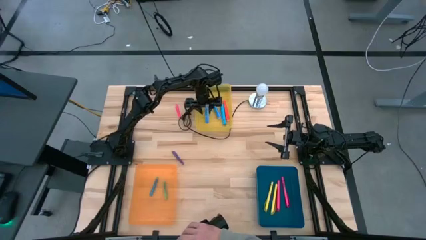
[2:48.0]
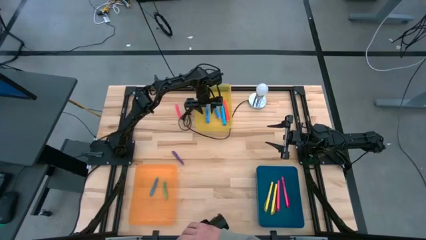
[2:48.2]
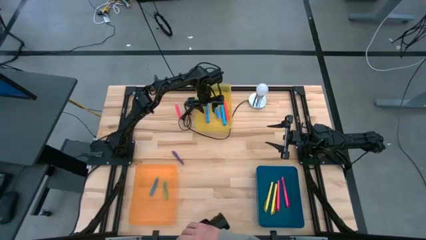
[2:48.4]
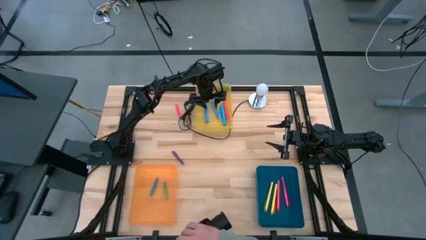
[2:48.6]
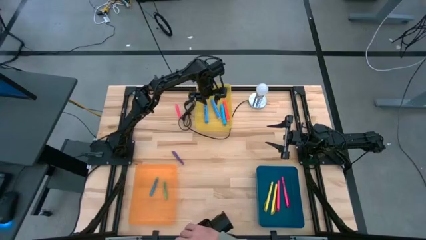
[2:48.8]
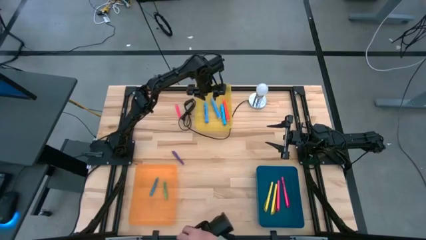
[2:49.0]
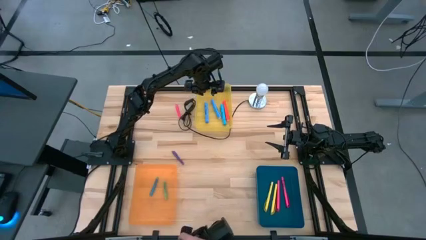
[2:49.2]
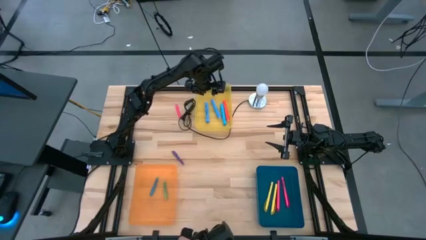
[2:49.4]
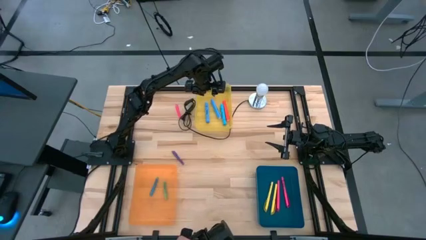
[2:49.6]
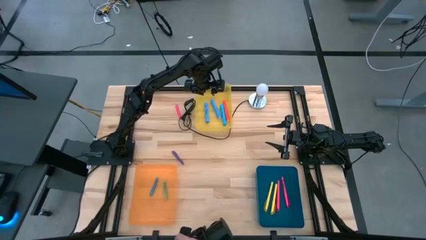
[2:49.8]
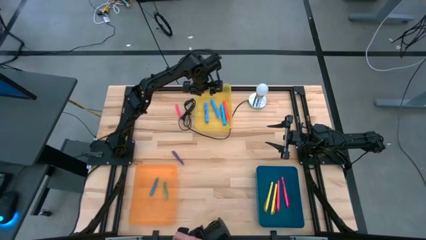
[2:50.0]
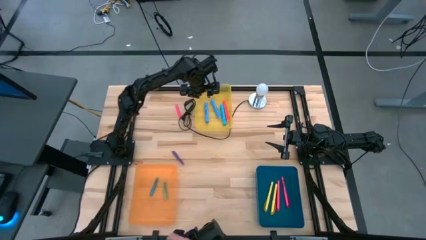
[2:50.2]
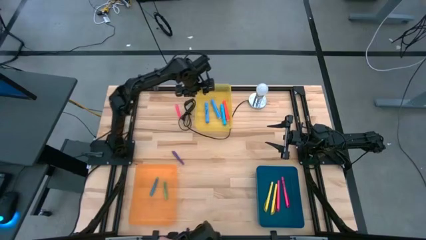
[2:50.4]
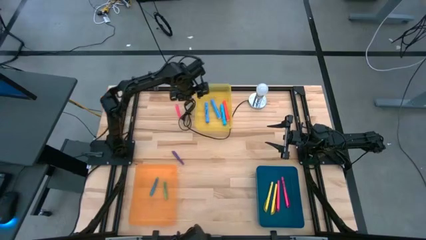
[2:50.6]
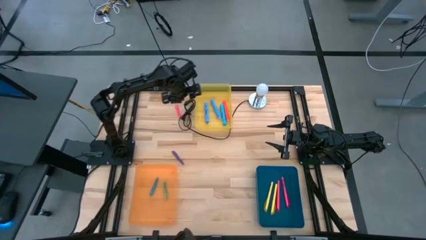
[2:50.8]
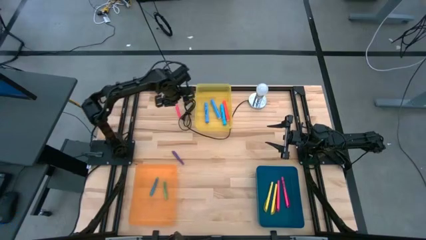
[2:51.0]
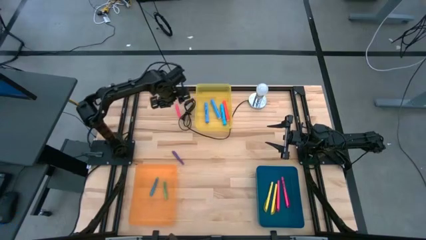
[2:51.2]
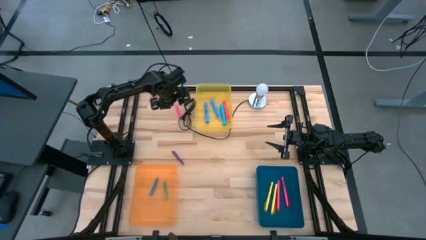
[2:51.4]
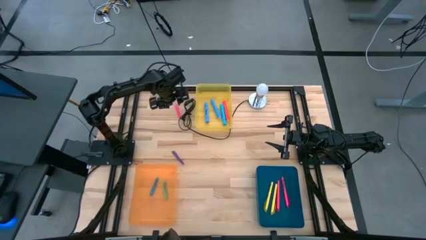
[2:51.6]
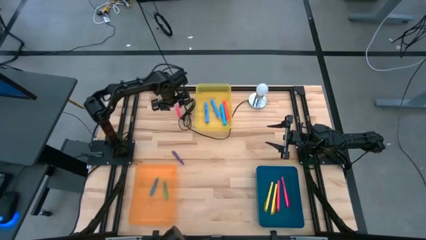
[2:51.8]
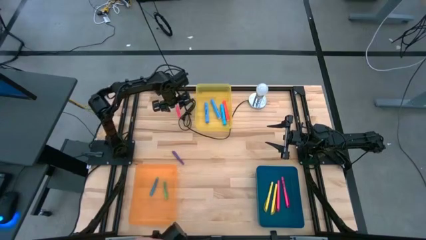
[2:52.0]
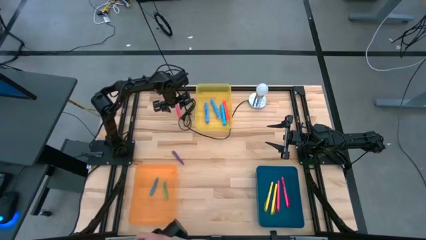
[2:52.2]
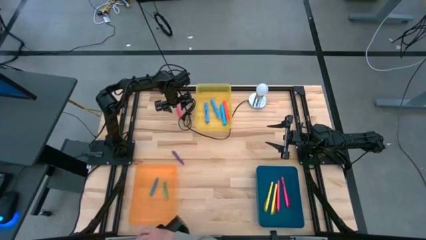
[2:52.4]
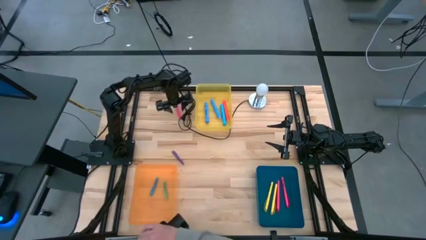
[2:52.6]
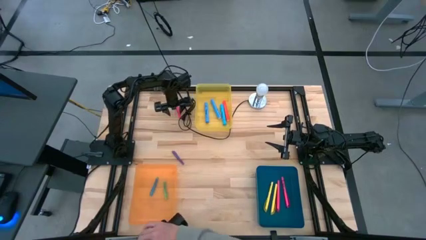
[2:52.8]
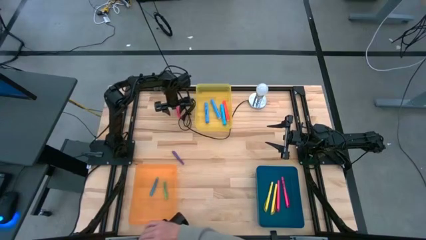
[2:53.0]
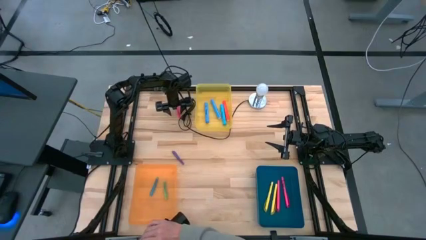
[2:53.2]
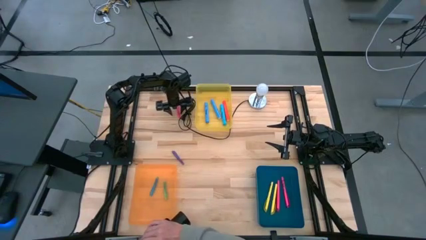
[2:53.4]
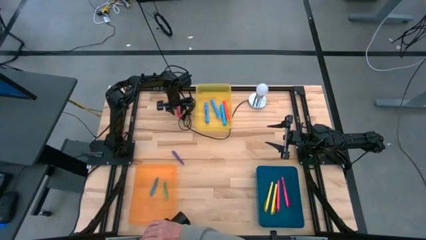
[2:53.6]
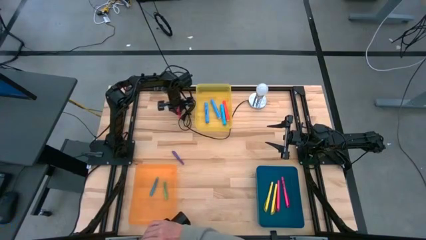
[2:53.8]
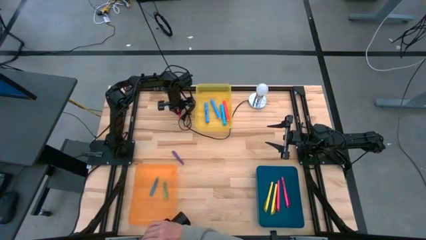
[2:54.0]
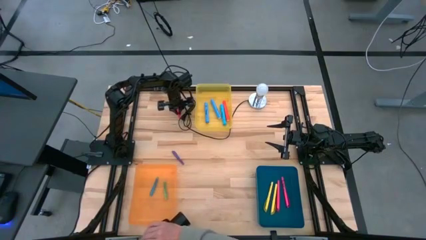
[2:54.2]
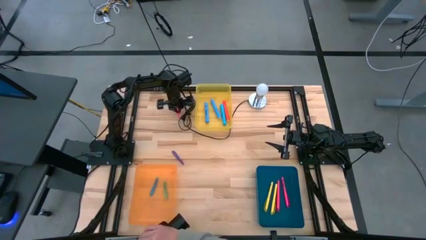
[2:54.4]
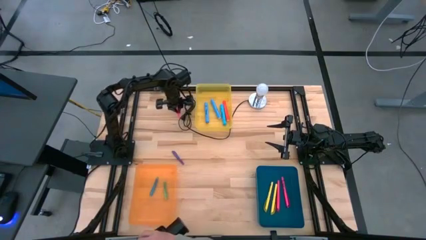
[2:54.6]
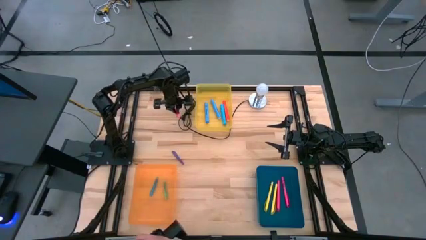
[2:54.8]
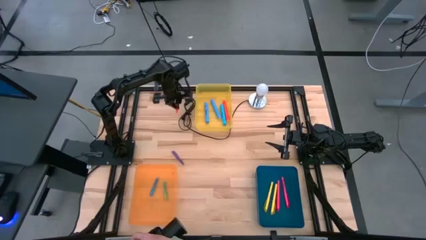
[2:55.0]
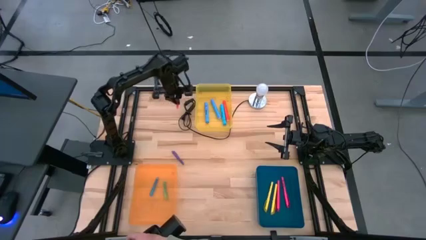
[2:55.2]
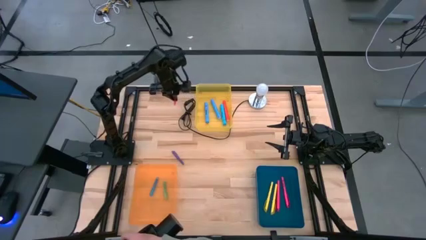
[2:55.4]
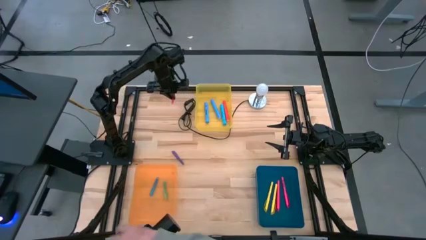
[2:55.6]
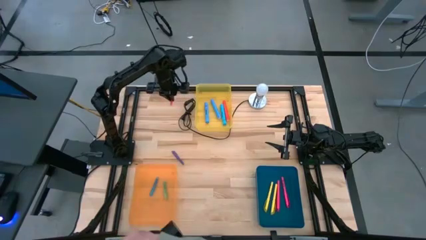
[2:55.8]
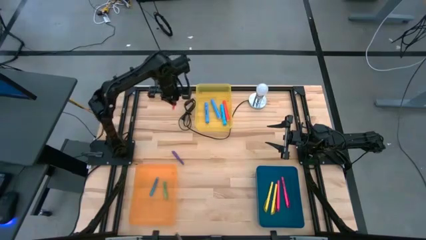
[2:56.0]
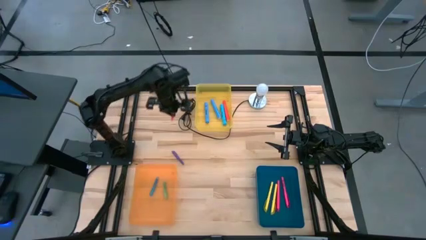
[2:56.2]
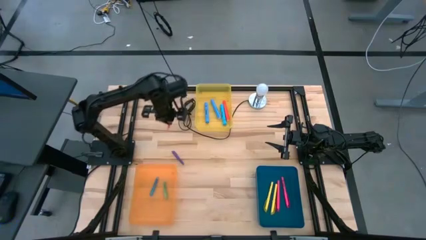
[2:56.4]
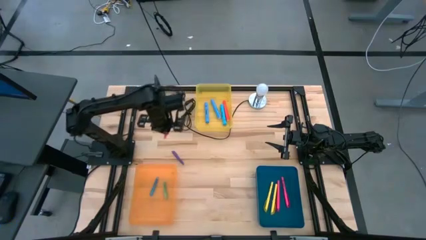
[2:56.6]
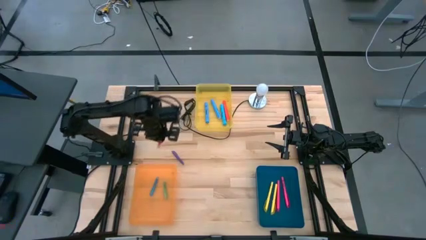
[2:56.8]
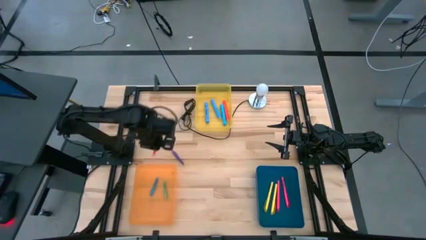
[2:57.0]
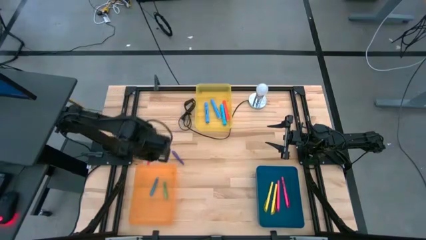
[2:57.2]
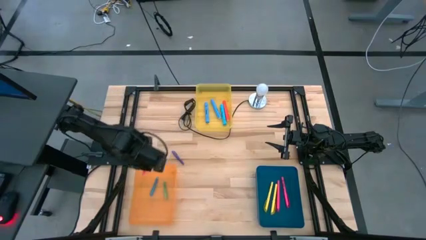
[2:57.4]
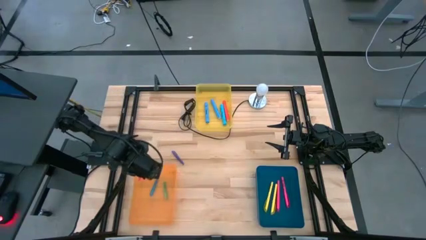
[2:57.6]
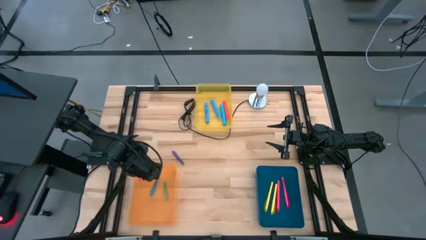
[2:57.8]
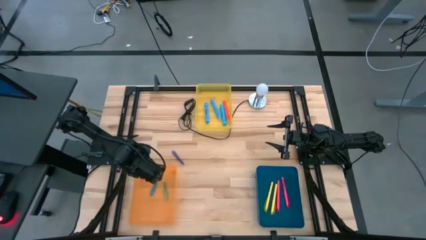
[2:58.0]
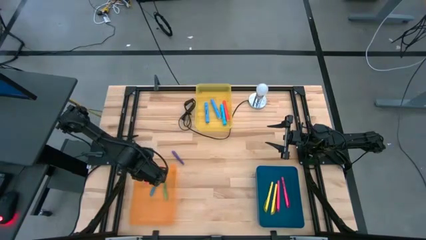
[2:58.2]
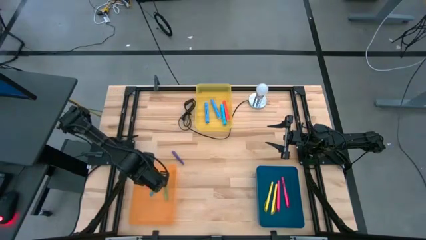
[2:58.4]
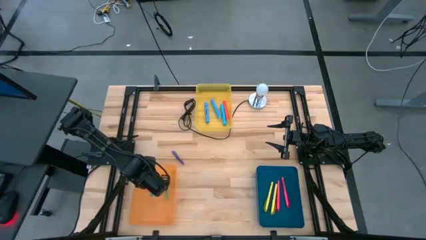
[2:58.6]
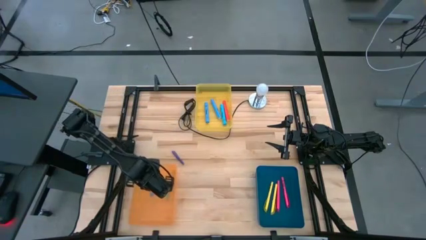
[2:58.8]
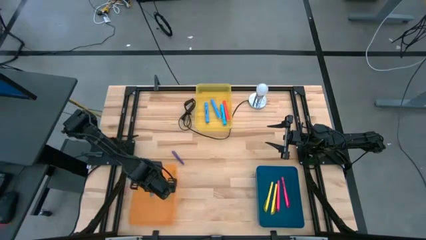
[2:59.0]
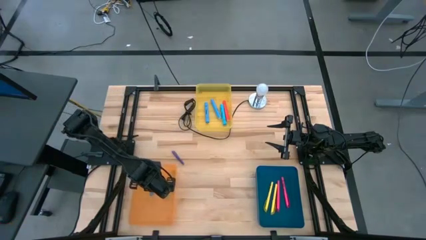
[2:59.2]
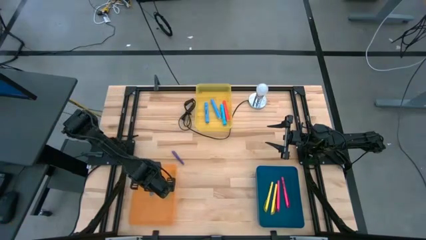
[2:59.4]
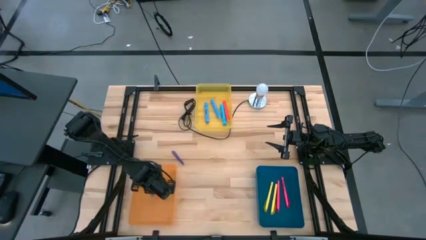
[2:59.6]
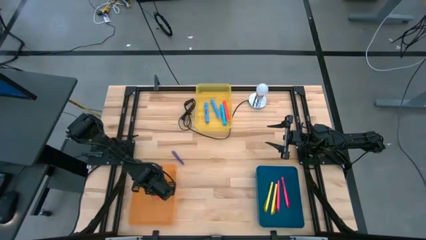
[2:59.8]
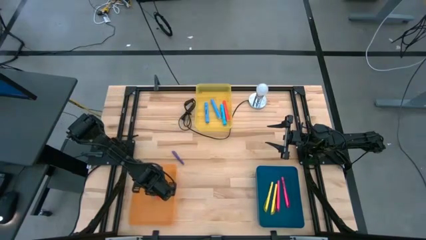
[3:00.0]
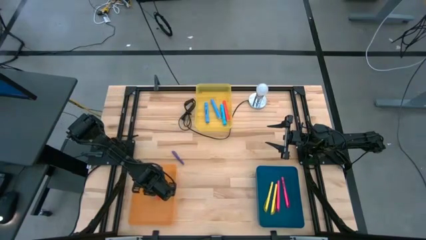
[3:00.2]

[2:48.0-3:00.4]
Task: Pick & Place Markers
Put the pink highlighter pen into the orange bin
